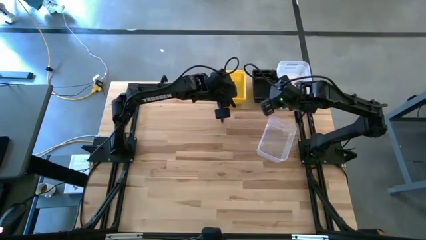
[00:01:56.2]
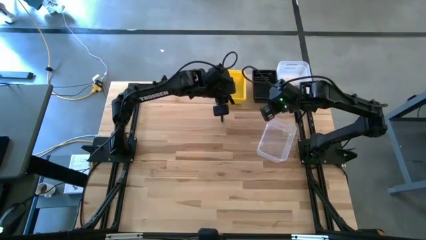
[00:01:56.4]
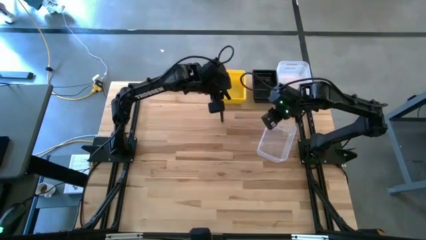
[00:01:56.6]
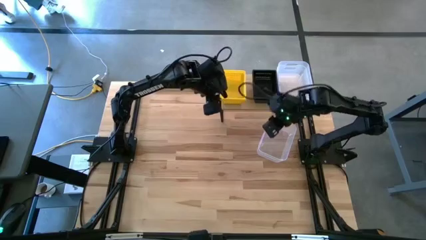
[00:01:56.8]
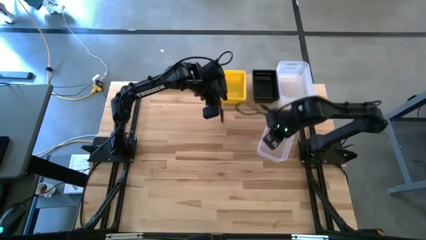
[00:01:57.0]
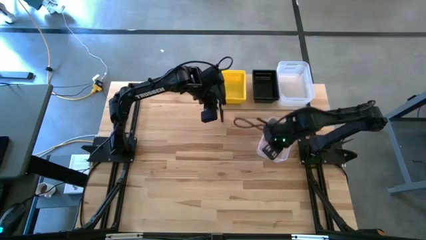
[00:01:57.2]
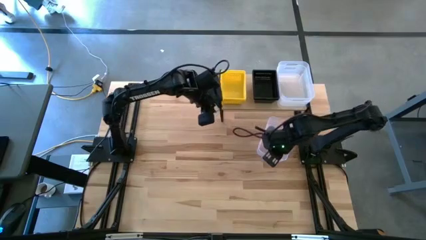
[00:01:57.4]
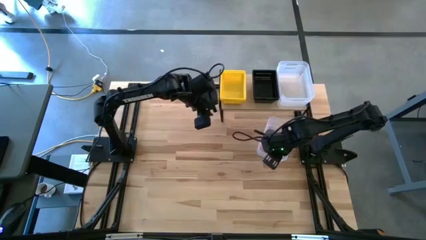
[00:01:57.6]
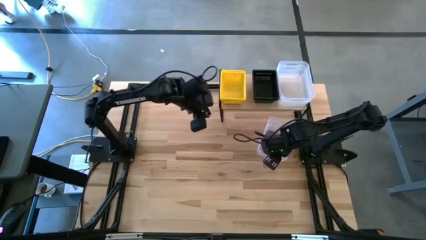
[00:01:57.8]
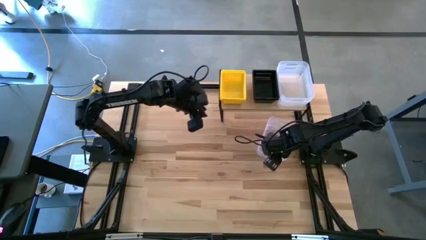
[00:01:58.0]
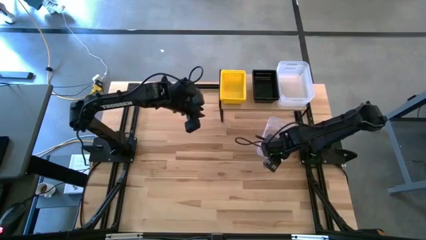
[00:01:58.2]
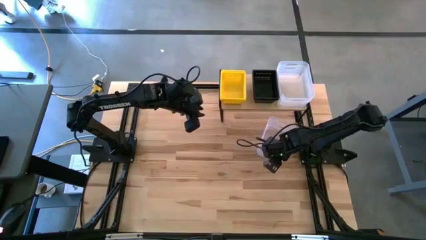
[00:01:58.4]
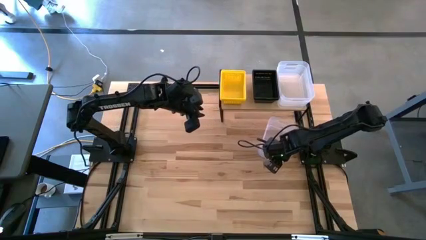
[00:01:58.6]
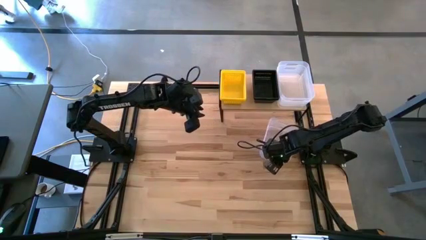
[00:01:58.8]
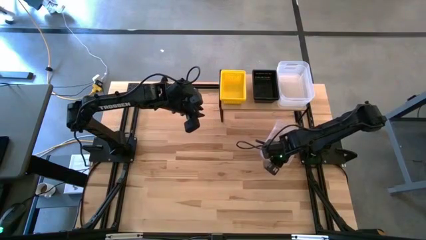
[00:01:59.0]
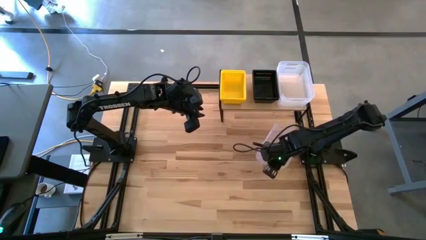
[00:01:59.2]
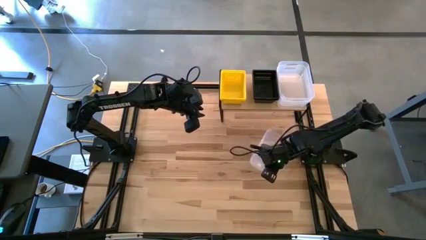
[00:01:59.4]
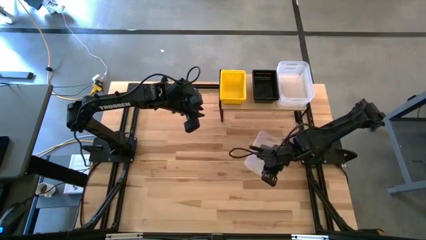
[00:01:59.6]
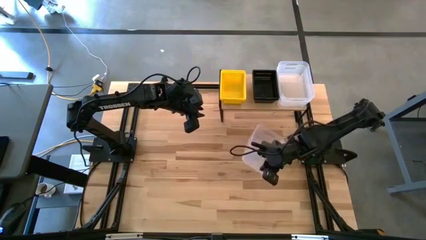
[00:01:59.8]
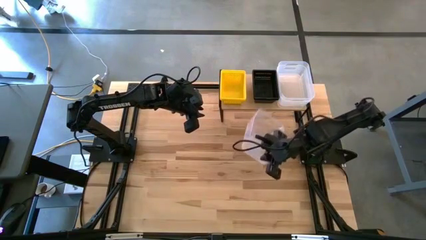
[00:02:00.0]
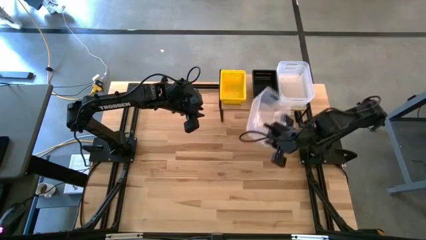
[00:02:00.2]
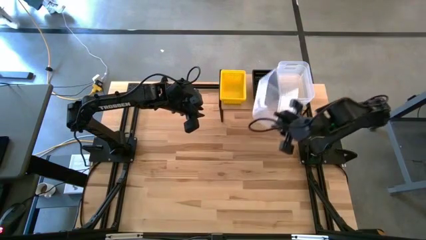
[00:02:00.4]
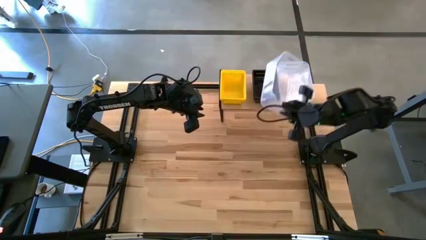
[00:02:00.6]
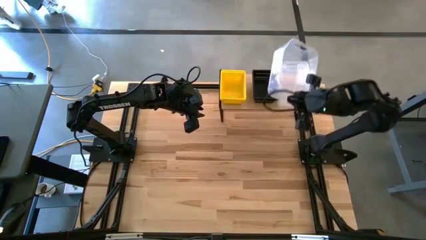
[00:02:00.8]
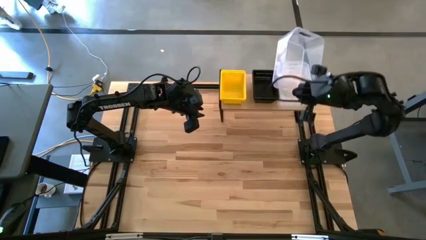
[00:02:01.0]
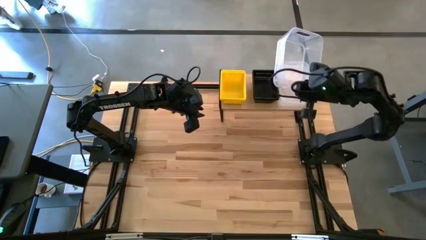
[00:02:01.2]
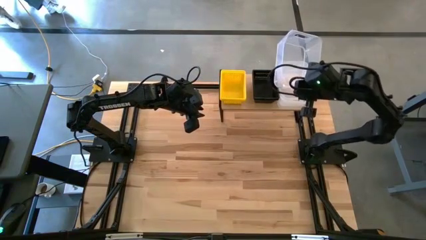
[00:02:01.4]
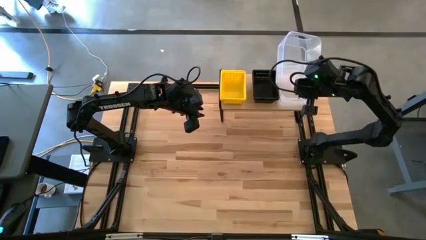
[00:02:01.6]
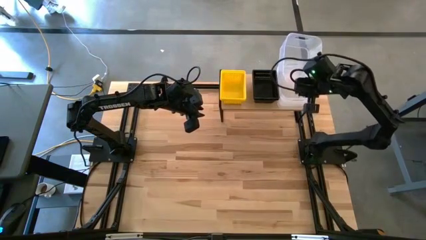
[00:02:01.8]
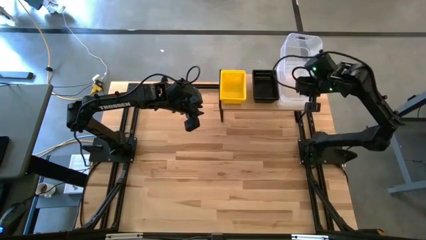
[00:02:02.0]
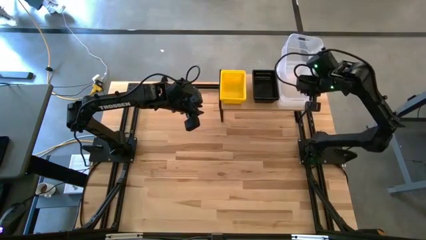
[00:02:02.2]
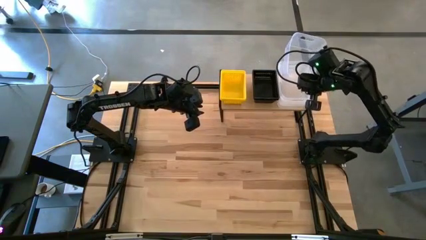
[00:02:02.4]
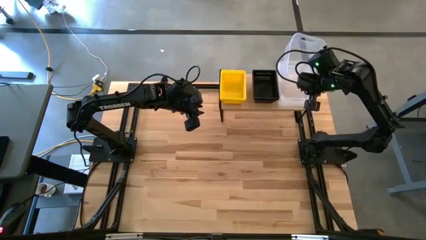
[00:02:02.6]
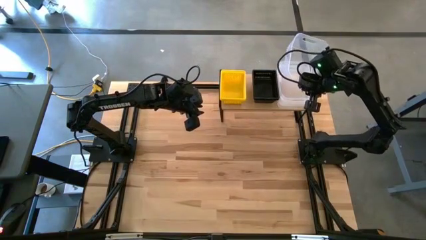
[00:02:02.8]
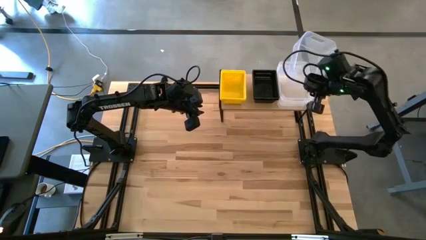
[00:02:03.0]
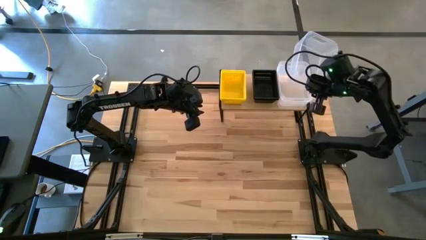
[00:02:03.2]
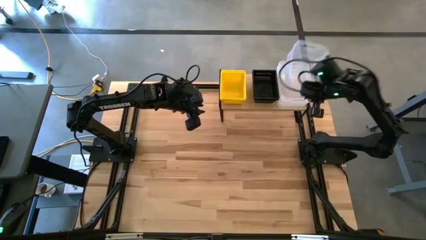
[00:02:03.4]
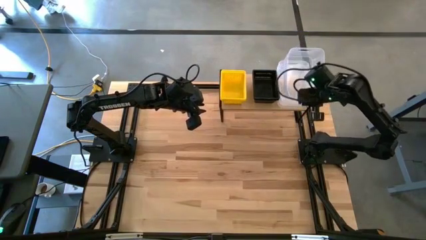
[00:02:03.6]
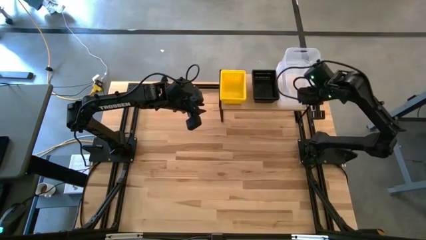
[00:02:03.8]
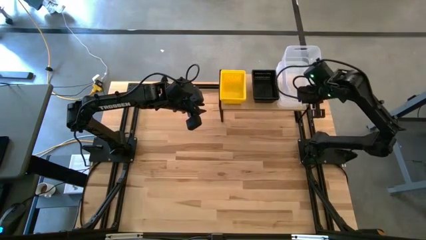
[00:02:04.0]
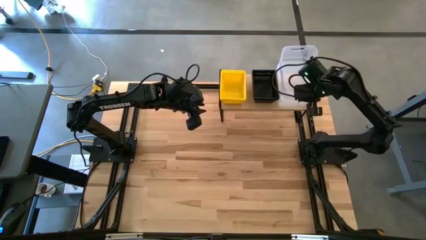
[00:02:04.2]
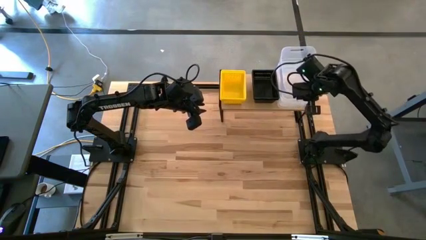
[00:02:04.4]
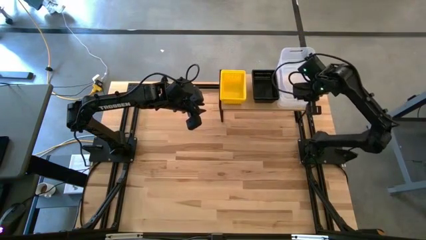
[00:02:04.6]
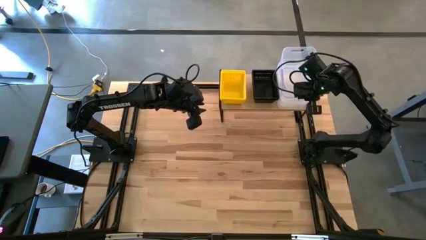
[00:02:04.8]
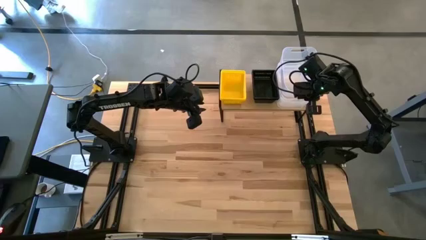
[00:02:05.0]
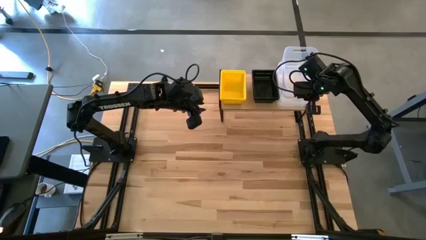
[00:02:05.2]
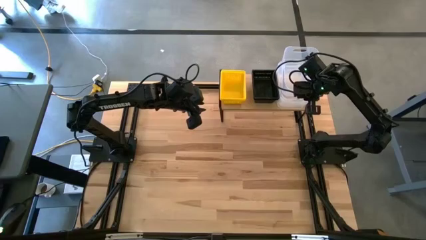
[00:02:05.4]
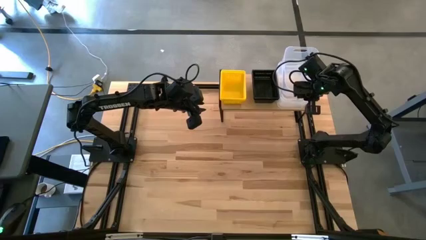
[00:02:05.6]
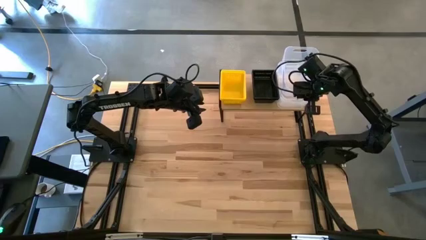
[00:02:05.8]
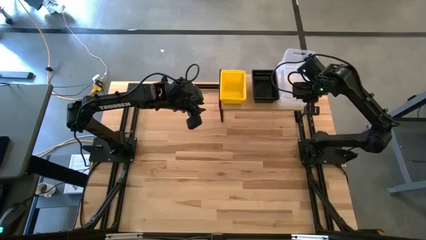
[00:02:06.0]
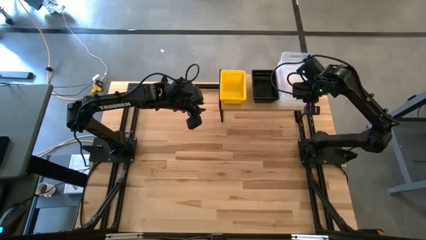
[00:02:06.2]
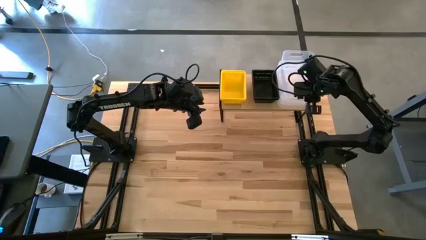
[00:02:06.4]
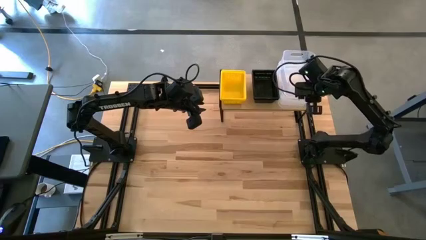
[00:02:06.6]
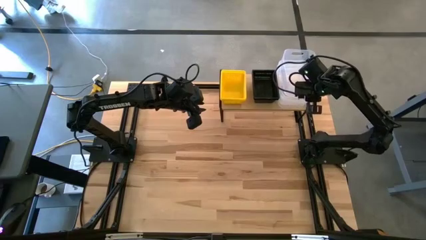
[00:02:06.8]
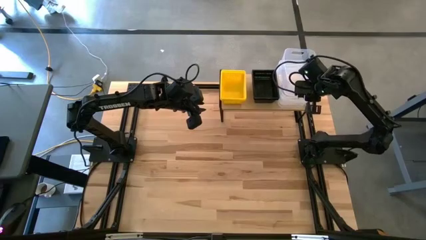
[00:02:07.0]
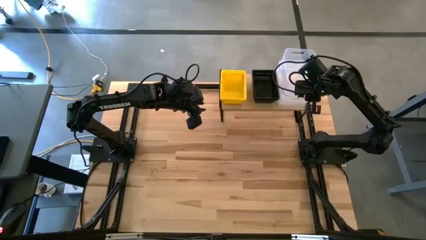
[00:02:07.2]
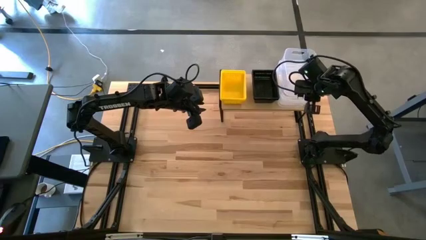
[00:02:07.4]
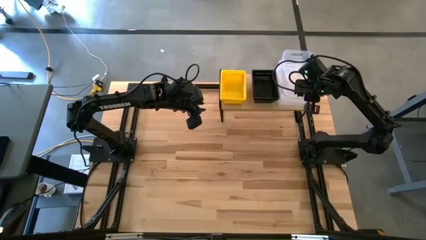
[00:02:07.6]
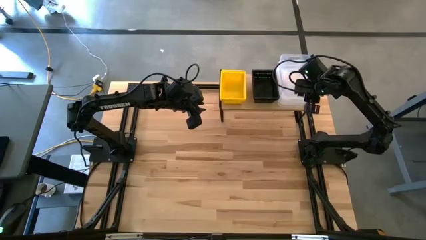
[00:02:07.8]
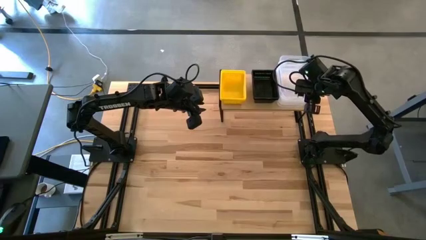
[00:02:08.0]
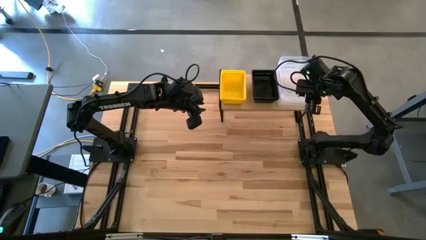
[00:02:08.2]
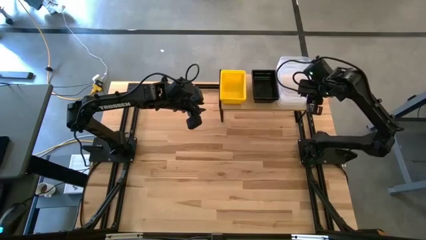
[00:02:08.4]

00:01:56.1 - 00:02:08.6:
Task: Stack baskets on shelf by color
Stack the transparent bin on top of the other stacked transparent bins on the shelf

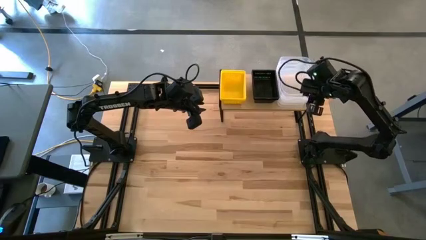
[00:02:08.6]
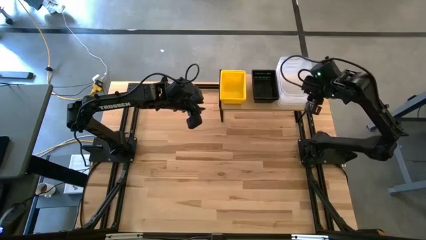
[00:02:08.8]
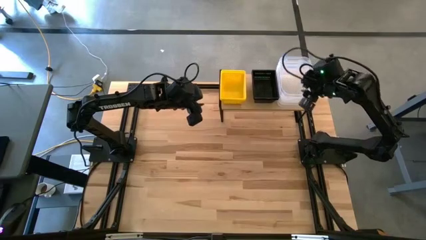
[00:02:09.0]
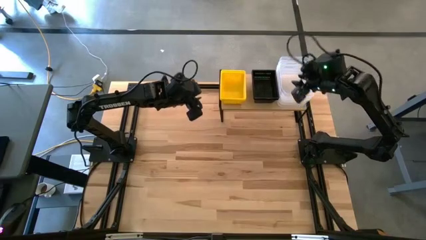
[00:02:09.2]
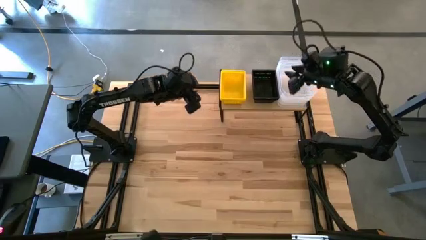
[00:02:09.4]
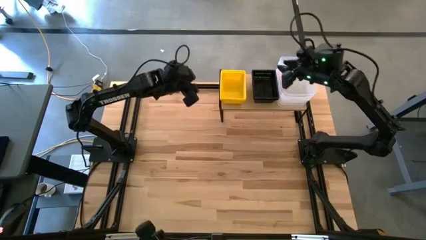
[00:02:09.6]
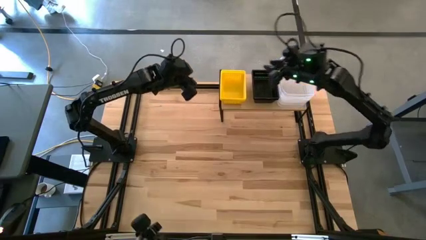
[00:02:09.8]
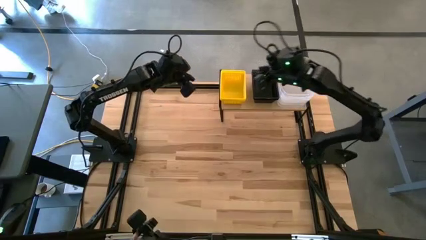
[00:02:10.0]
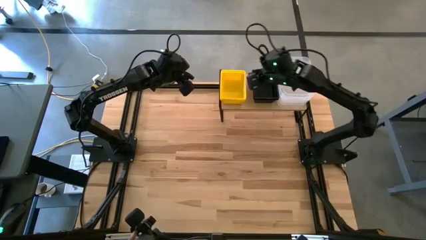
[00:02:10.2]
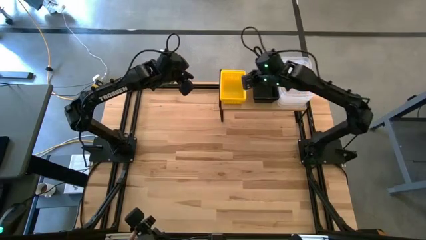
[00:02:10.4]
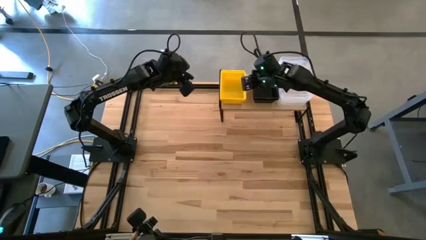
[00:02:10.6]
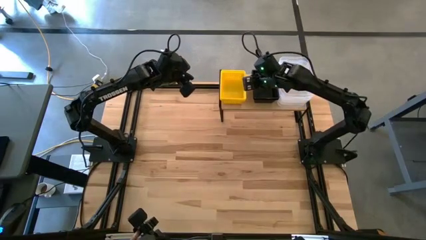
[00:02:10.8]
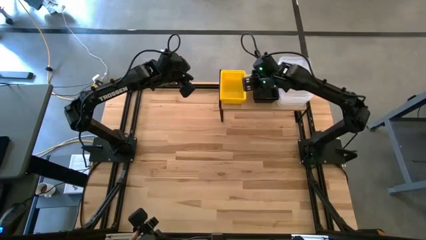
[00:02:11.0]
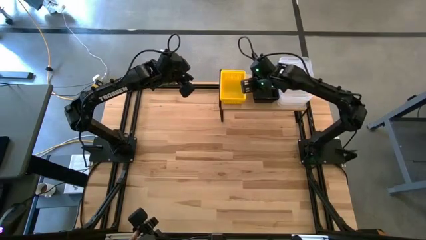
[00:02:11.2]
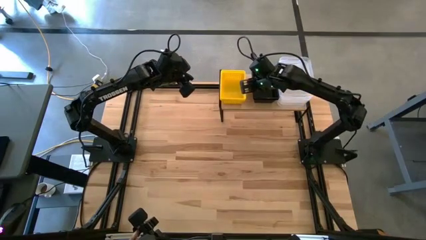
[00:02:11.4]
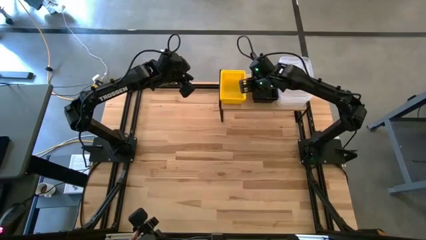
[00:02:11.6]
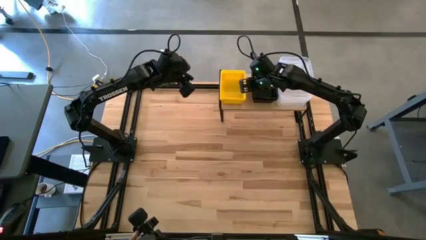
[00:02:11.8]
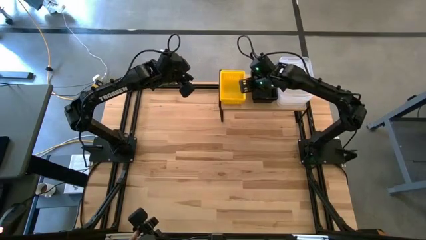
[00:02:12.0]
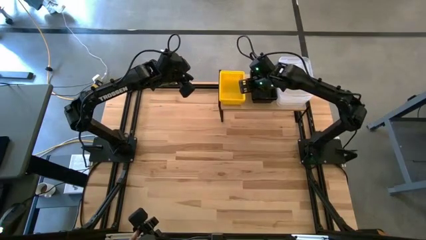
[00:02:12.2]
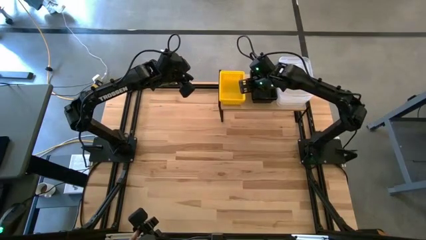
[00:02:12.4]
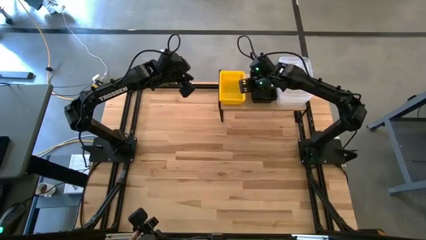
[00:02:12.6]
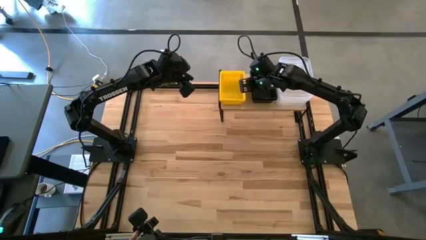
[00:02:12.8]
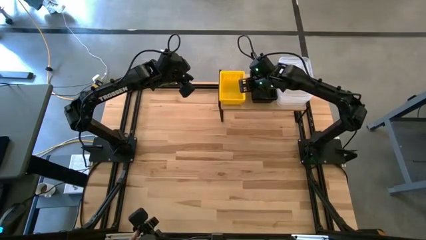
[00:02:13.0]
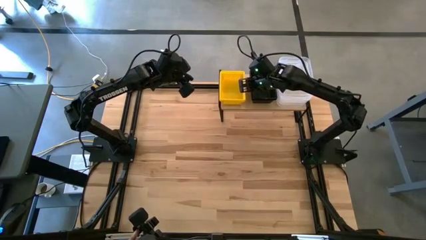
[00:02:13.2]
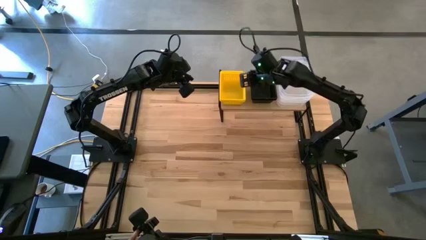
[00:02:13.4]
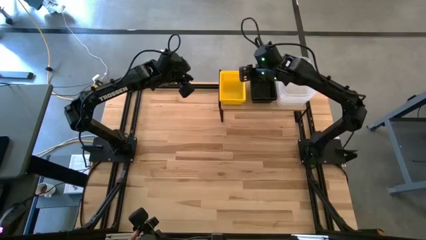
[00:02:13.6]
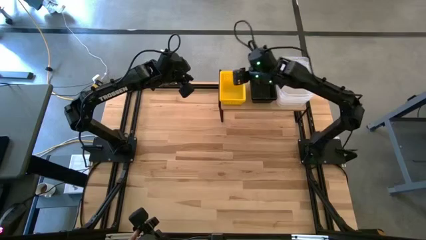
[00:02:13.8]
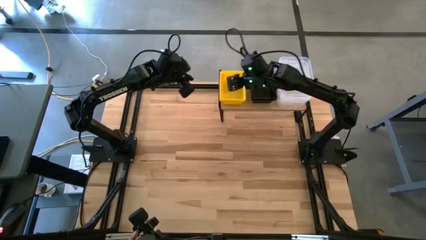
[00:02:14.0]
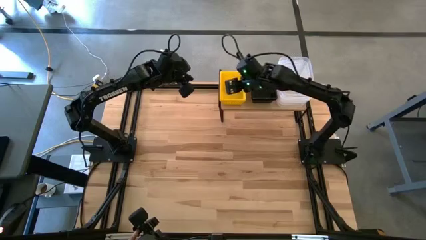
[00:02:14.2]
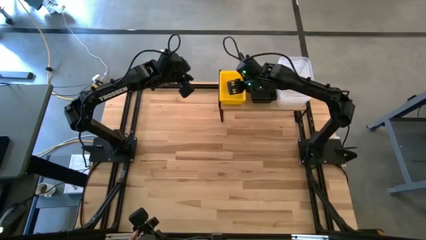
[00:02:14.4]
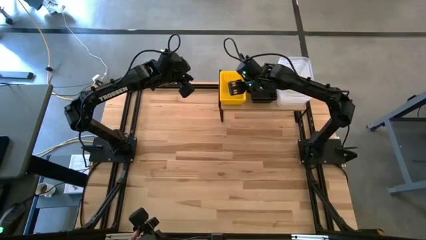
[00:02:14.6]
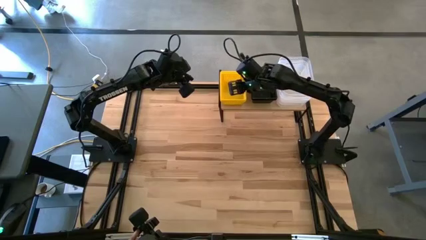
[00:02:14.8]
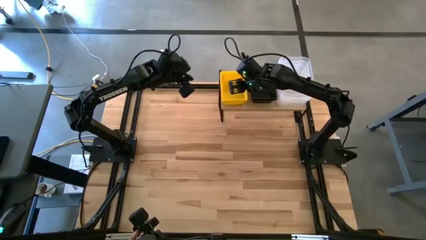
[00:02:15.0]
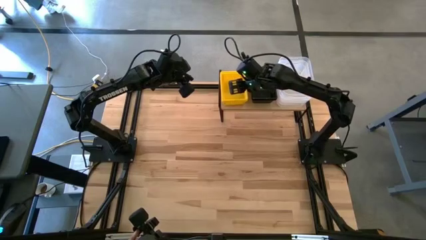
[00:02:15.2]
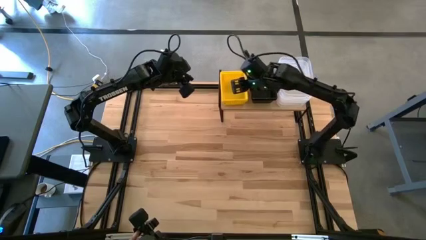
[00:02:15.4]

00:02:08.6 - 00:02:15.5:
Adjust the bins on the shelf
